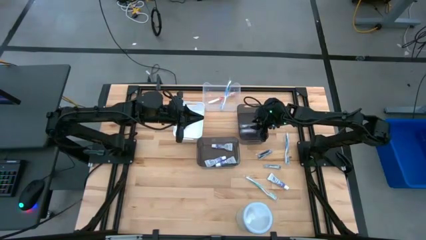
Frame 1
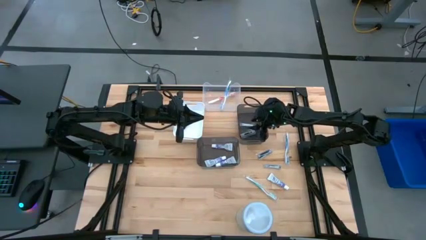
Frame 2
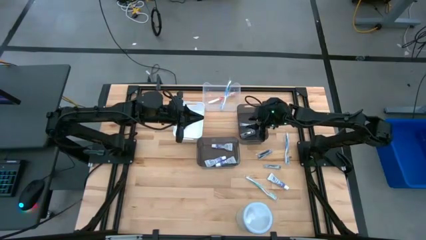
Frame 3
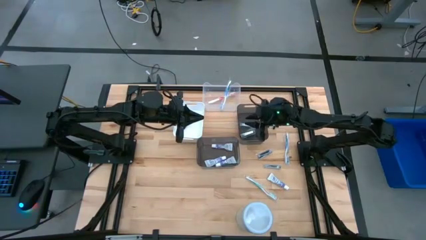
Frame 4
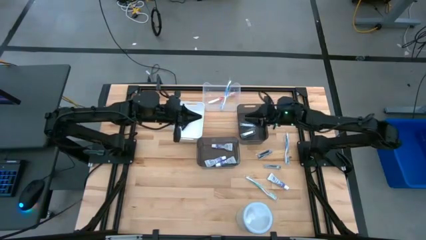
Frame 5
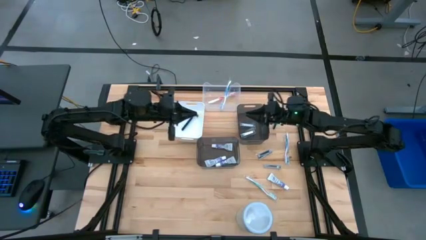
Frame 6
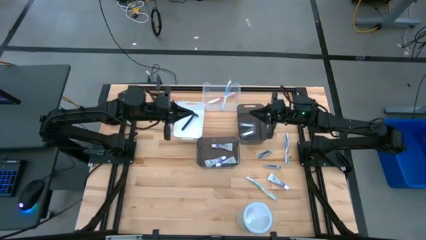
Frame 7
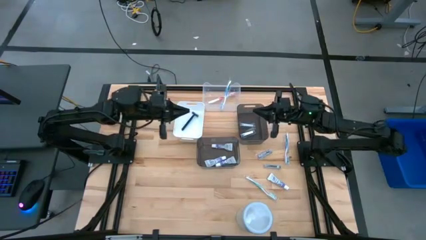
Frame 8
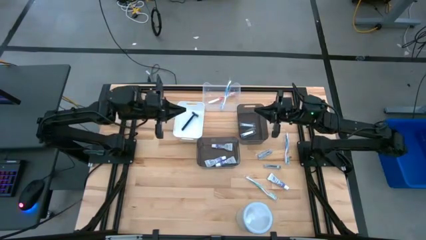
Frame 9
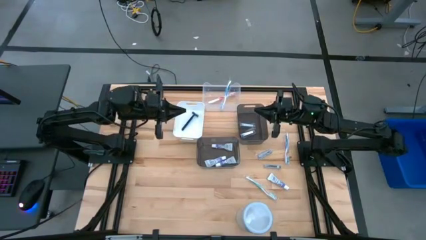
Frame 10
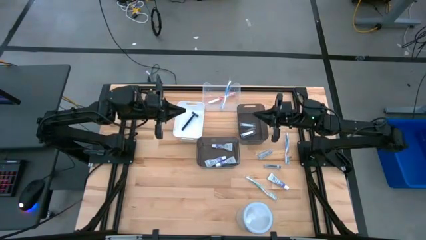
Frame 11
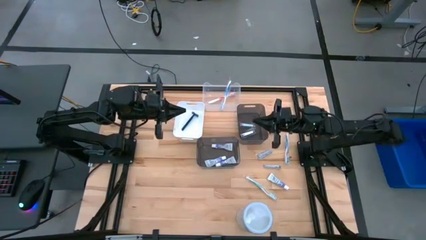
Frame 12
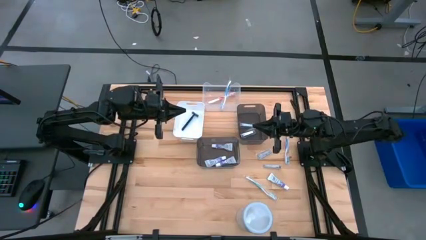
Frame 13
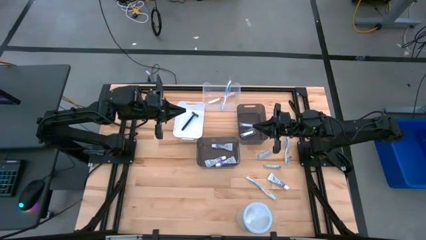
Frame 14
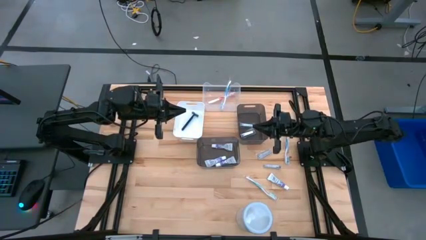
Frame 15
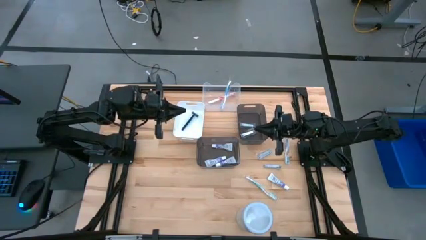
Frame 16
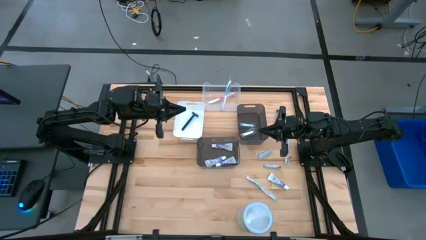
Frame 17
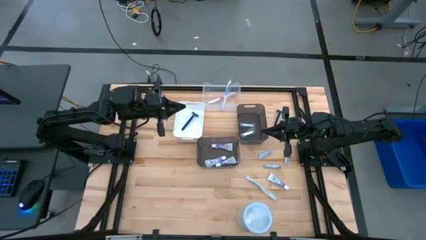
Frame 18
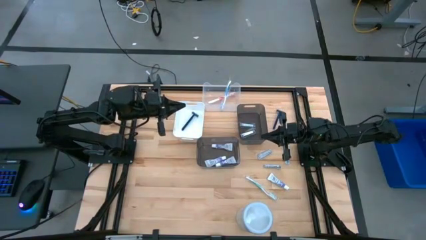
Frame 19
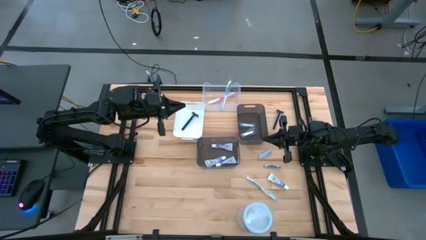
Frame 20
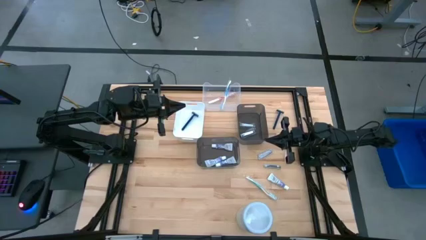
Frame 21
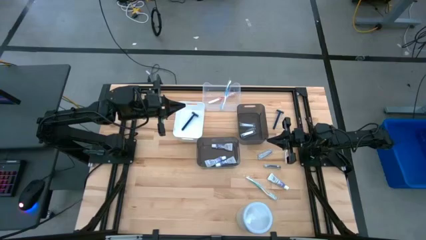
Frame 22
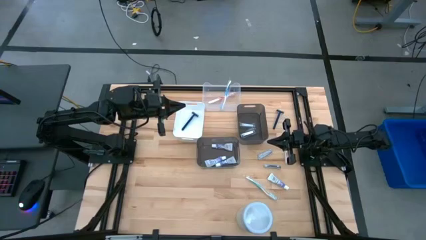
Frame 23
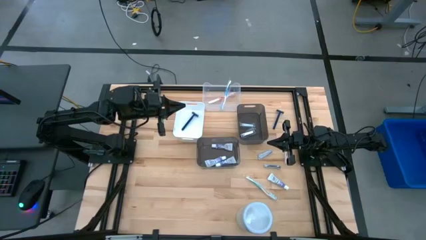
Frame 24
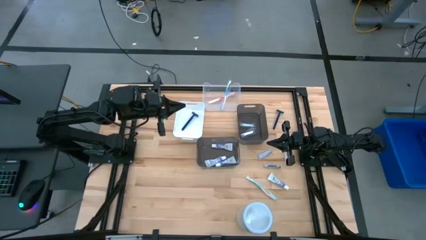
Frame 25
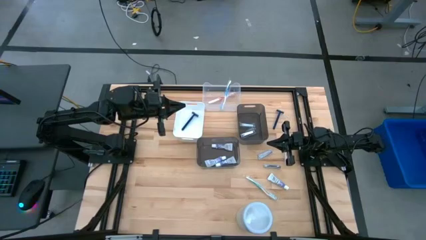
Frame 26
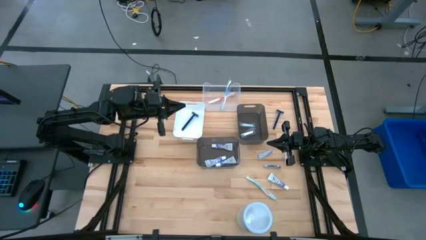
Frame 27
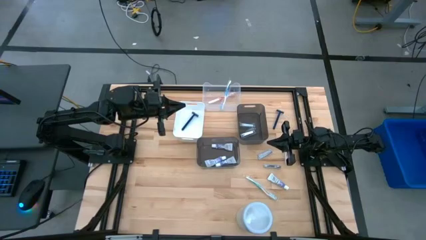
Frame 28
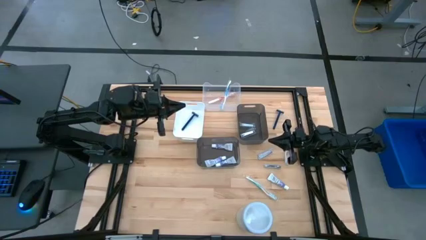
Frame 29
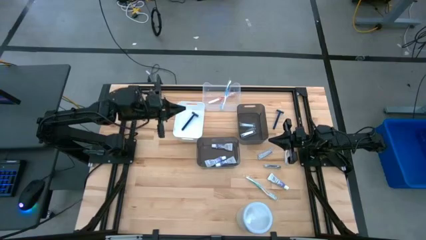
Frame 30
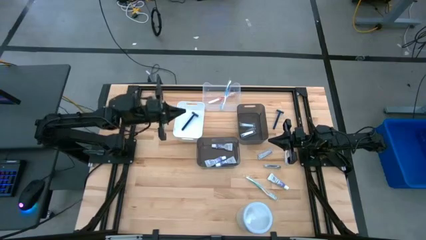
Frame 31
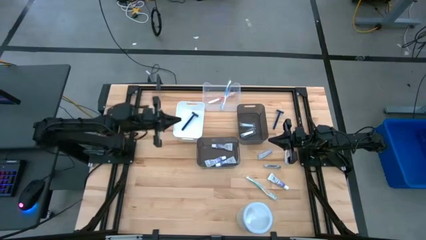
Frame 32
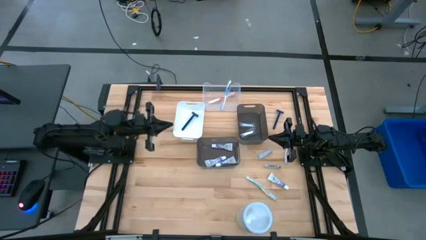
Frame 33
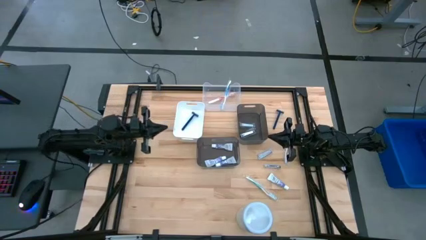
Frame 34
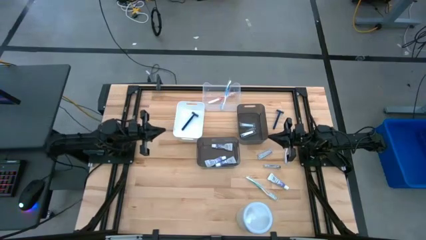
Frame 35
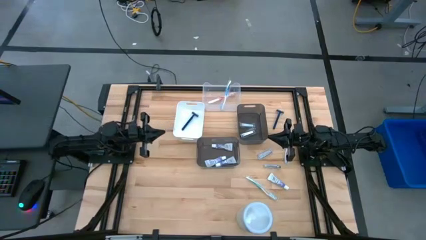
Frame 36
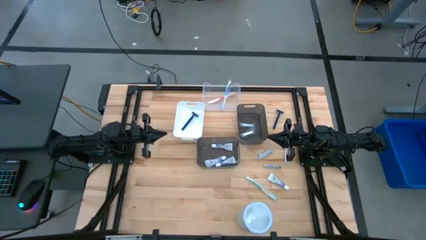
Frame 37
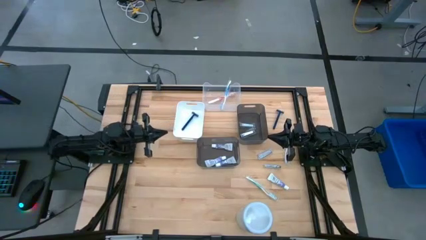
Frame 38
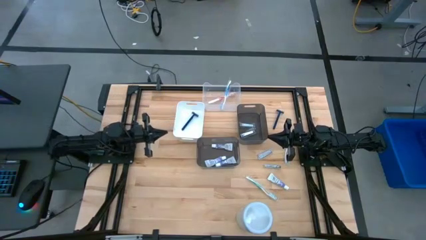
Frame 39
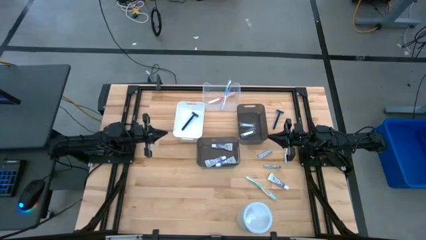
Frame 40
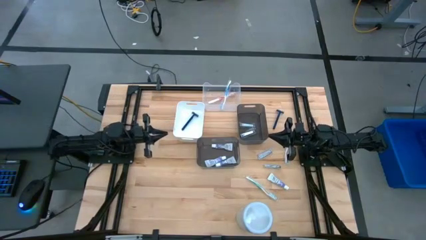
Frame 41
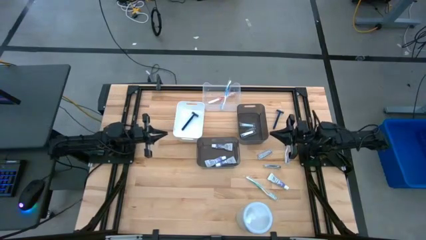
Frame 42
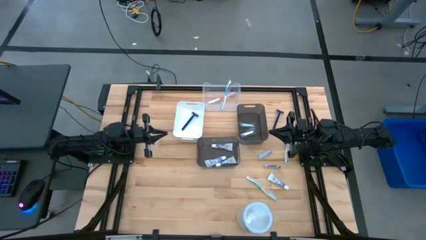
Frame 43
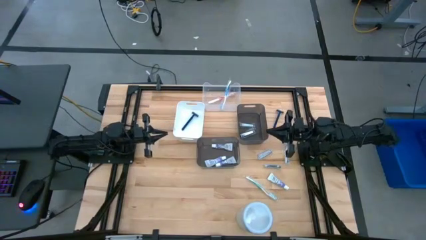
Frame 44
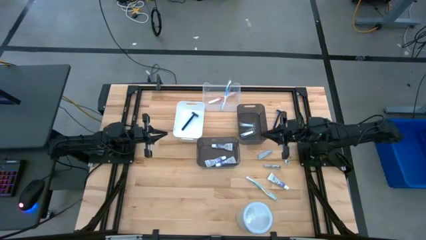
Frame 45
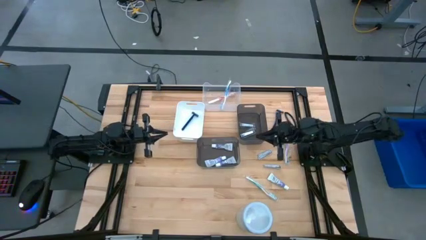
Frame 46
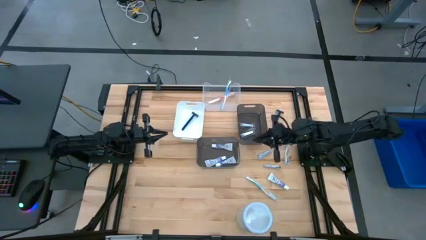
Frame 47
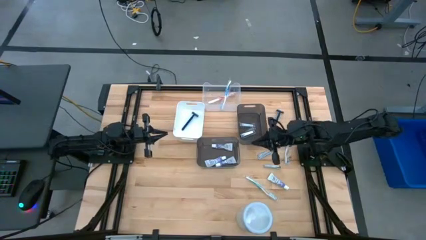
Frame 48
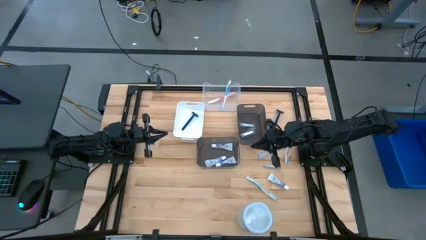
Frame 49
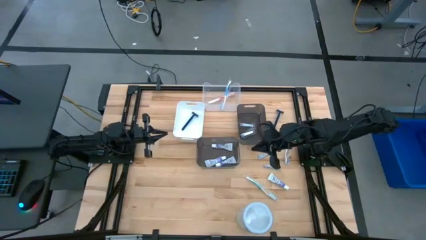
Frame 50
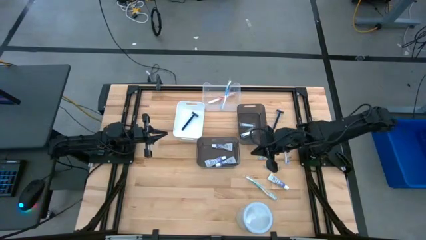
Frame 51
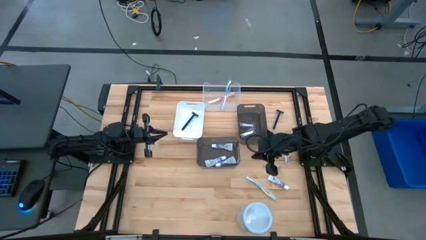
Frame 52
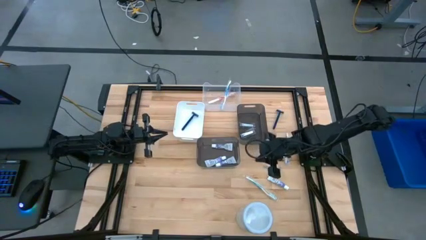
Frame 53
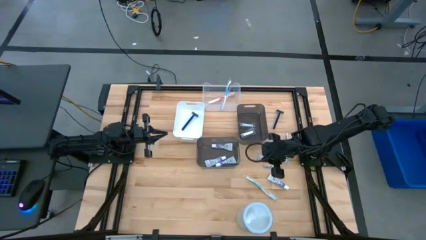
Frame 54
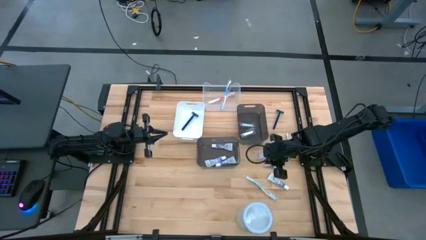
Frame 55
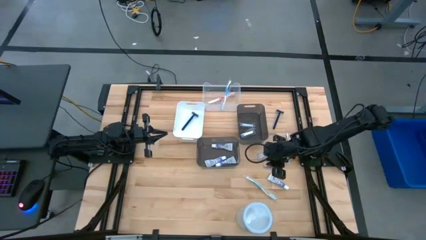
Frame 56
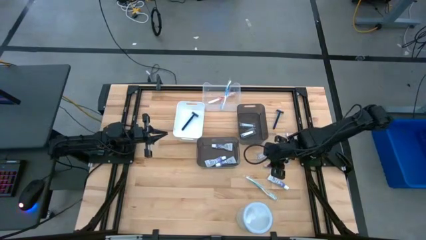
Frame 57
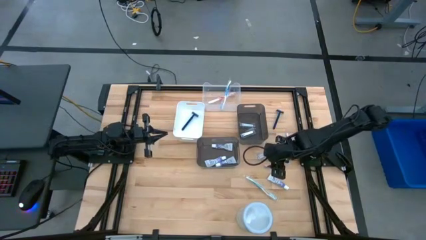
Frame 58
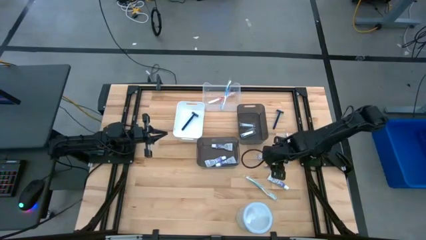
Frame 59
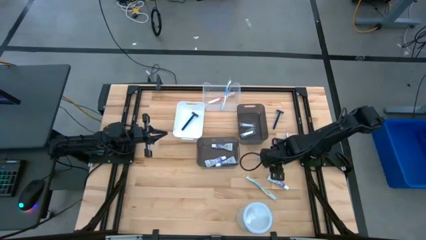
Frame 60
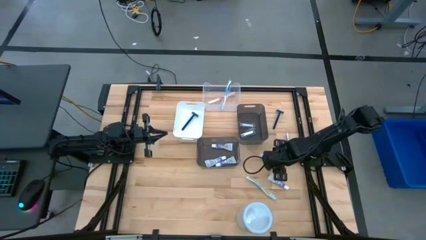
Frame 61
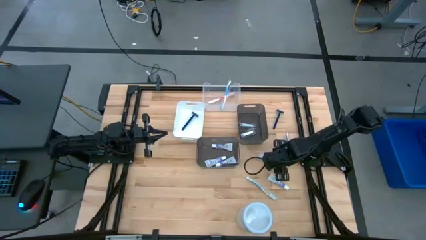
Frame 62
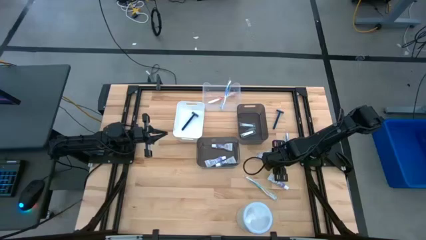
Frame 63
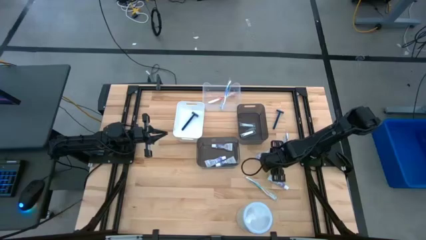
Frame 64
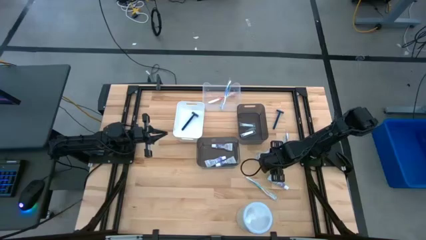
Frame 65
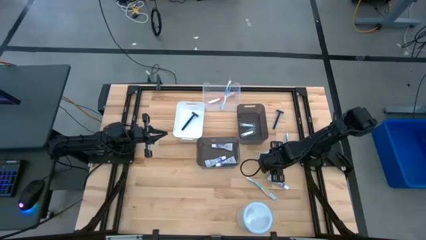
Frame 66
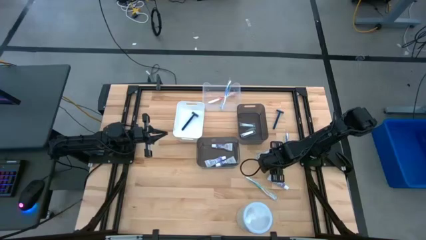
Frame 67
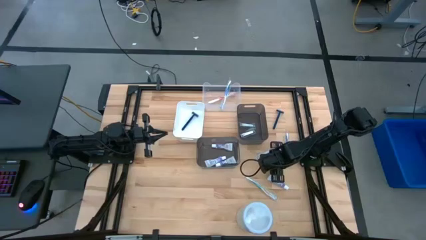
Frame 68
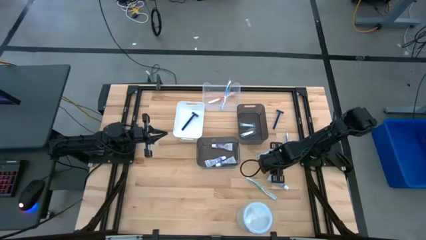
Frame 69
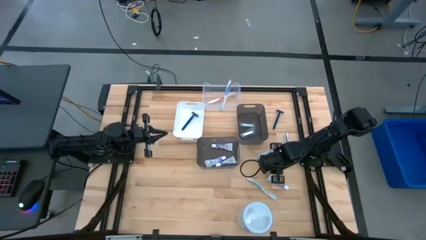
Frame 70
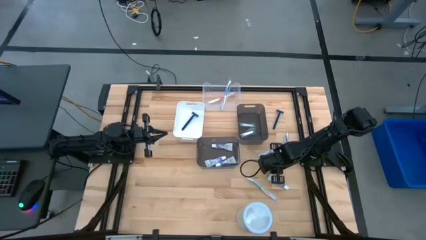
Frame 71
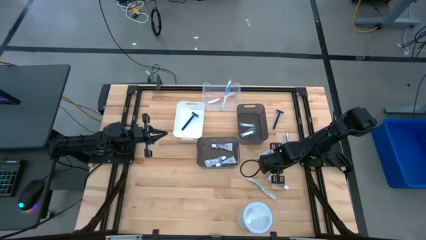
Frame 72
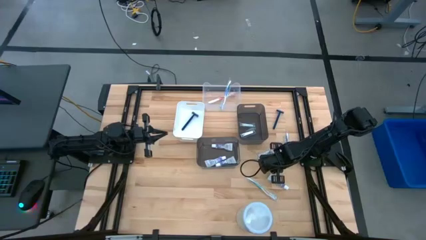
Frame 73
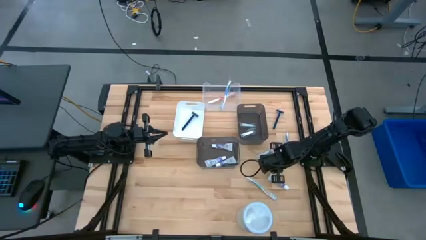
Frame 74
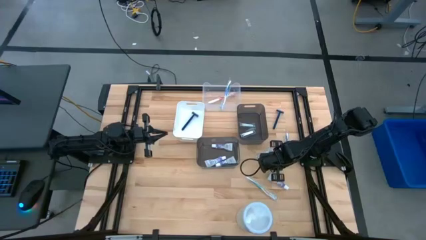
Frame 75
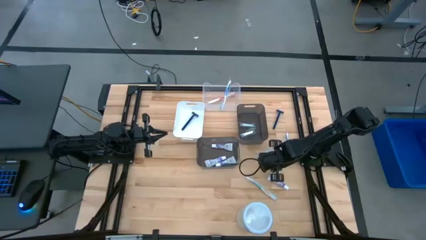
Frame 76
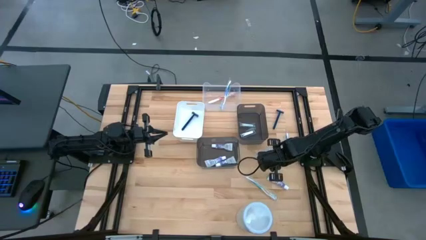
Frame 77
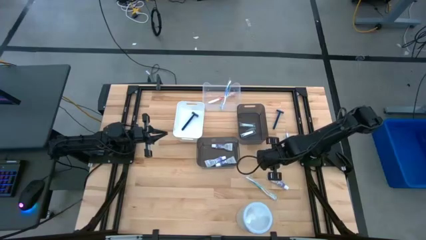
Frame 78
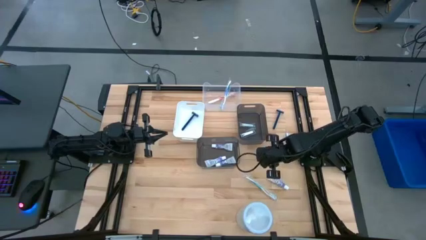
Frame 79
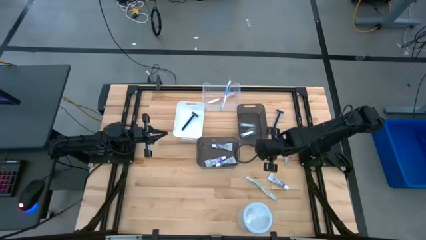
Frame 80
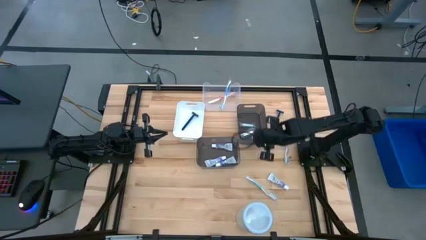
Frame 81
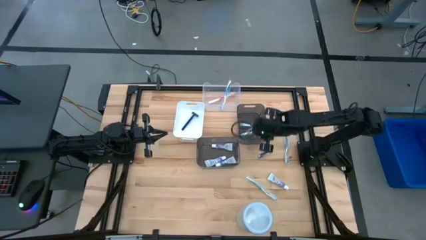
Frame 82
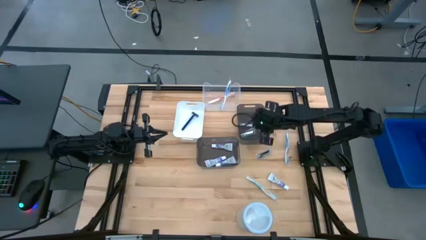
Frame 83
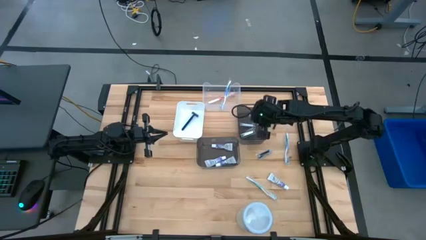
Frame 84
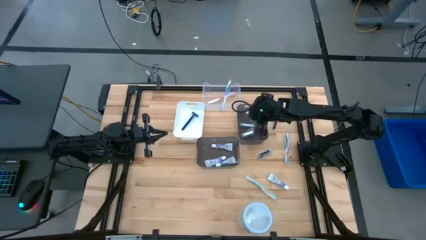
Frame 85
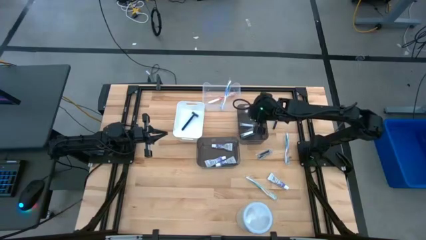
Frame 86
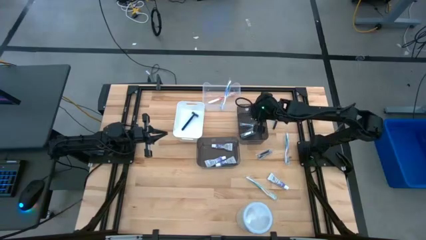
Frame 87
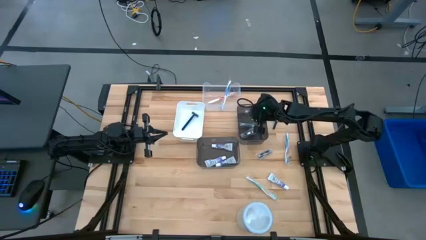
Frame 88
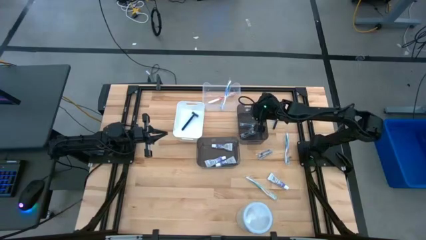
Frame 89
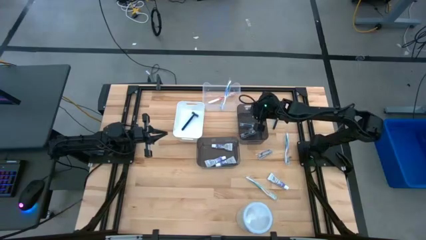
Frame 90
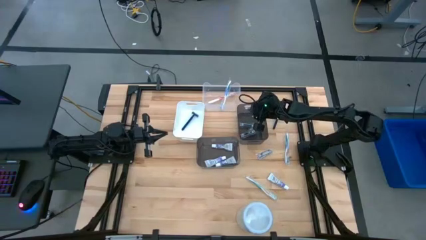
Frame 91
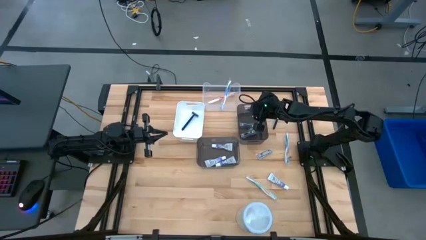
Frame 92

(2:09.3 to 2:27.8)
Task: Pick & Place Travel size toiletries
Put the silver nail cutter into the top black bin
